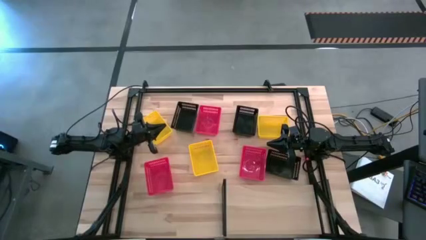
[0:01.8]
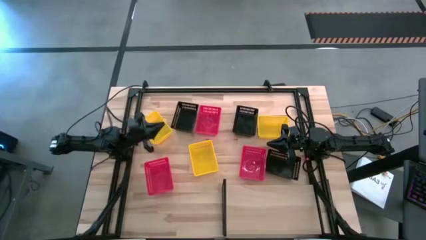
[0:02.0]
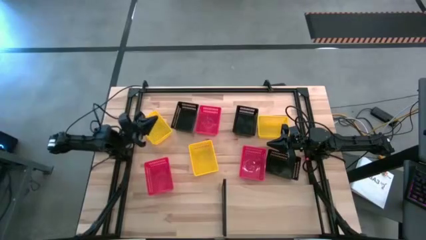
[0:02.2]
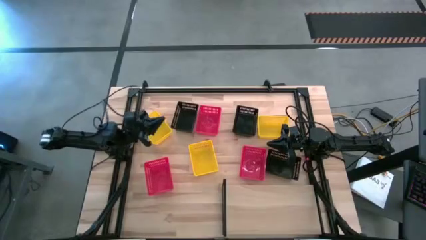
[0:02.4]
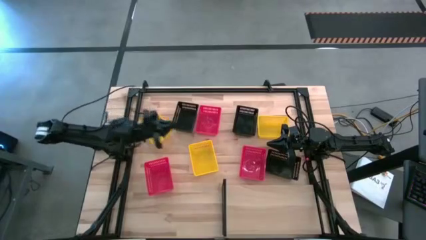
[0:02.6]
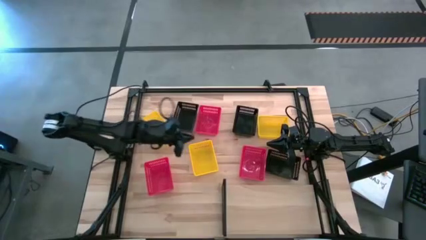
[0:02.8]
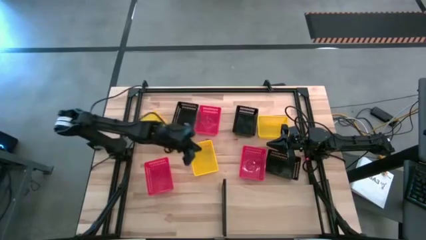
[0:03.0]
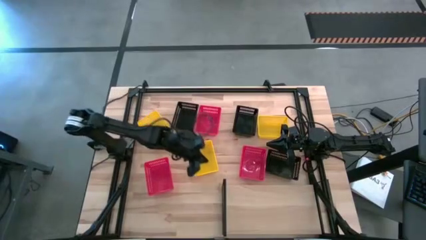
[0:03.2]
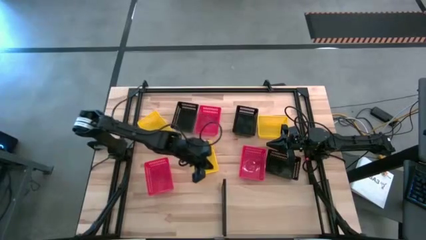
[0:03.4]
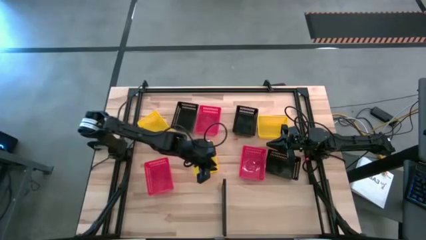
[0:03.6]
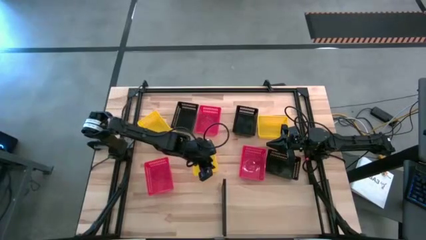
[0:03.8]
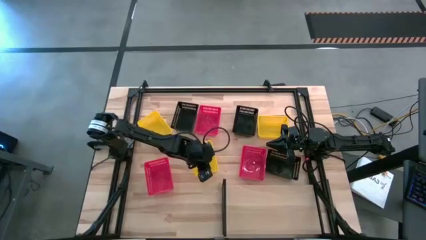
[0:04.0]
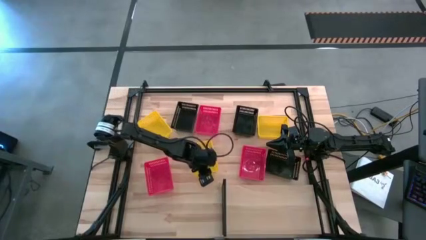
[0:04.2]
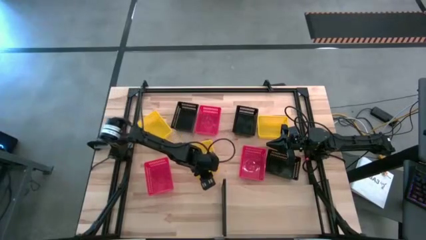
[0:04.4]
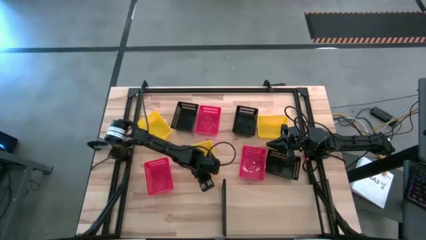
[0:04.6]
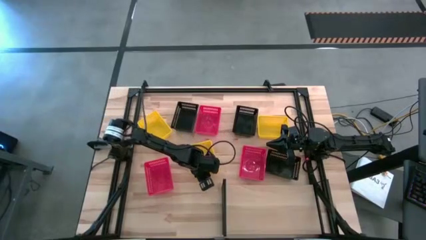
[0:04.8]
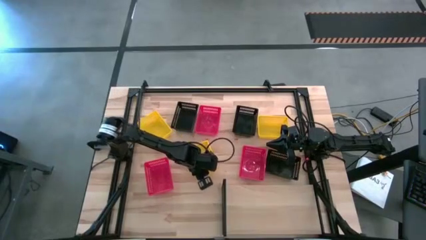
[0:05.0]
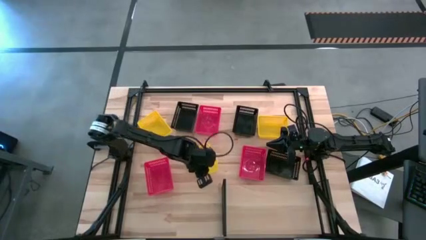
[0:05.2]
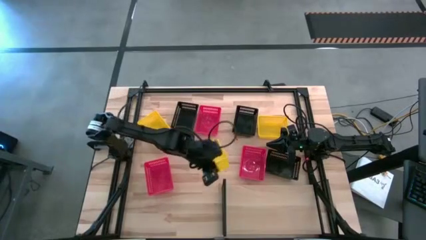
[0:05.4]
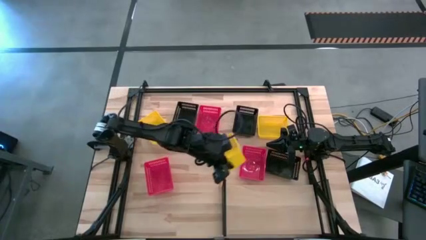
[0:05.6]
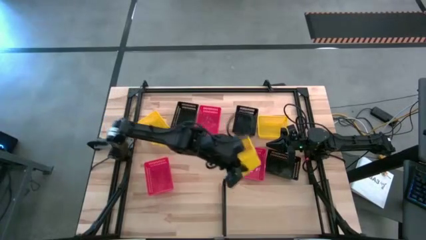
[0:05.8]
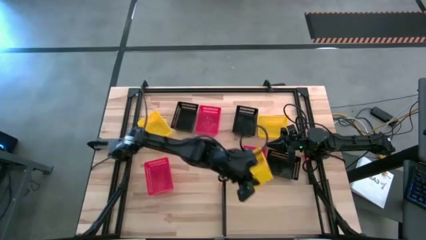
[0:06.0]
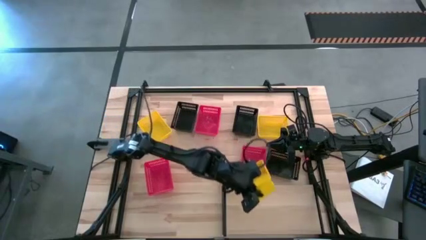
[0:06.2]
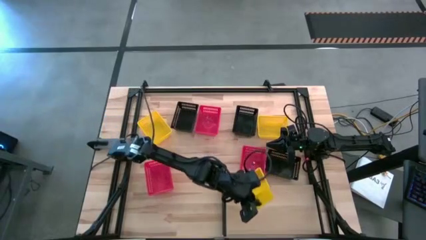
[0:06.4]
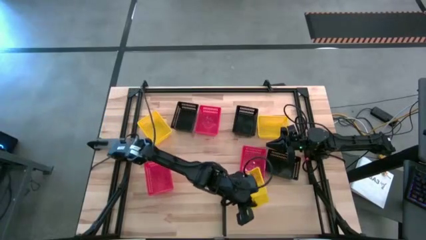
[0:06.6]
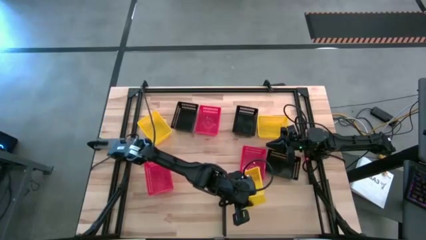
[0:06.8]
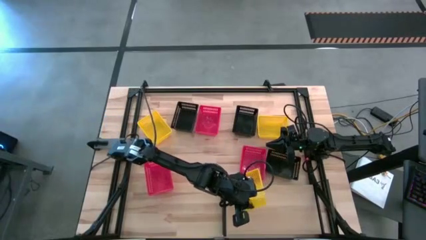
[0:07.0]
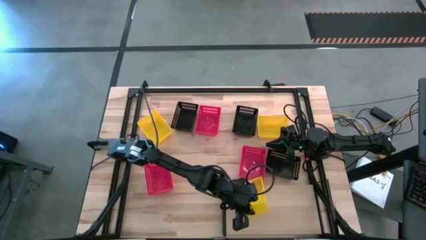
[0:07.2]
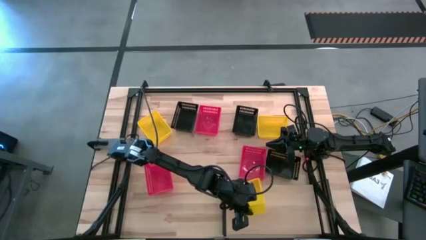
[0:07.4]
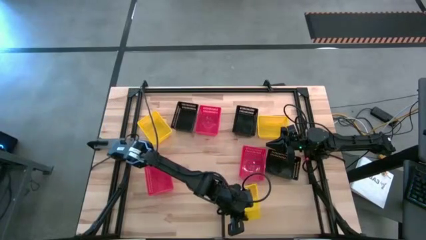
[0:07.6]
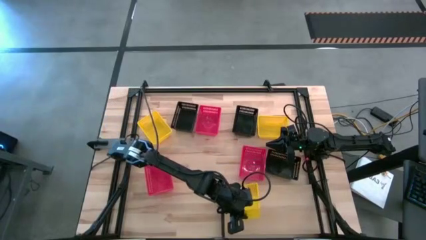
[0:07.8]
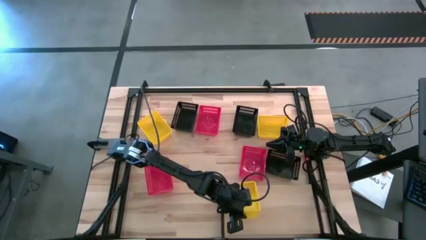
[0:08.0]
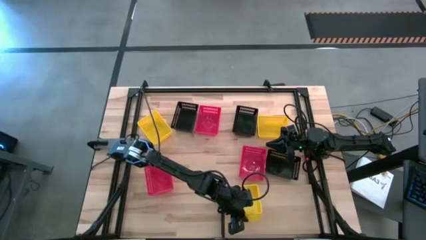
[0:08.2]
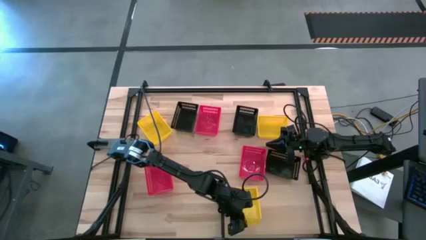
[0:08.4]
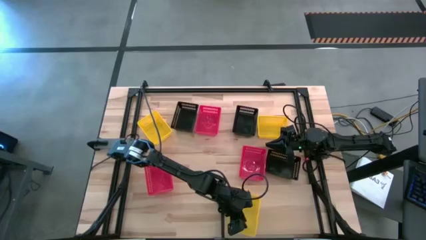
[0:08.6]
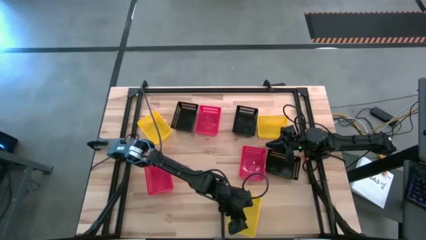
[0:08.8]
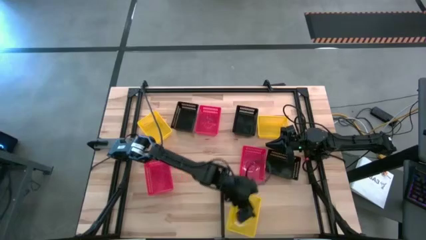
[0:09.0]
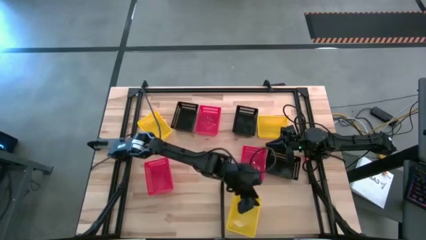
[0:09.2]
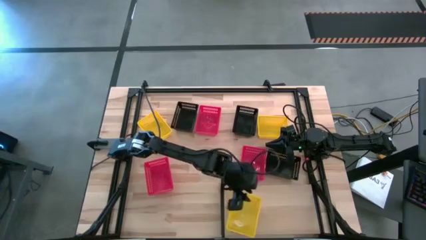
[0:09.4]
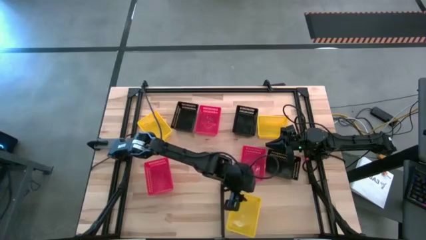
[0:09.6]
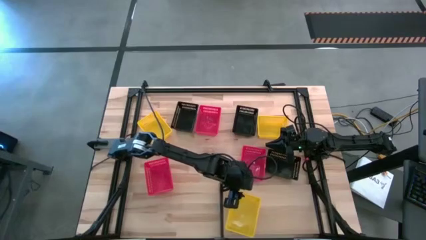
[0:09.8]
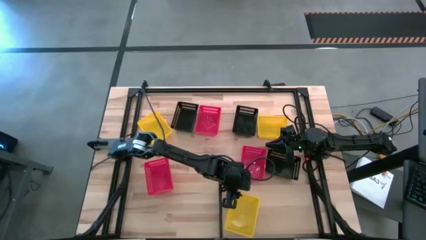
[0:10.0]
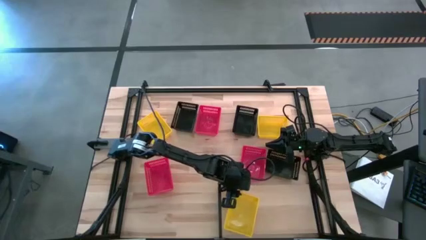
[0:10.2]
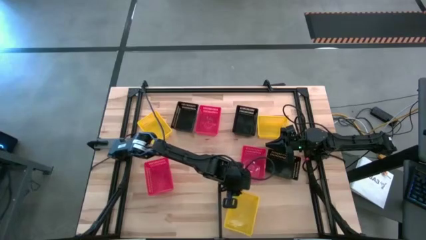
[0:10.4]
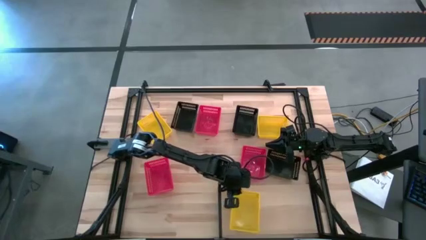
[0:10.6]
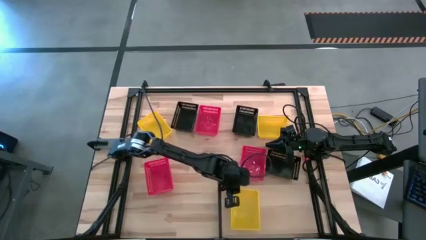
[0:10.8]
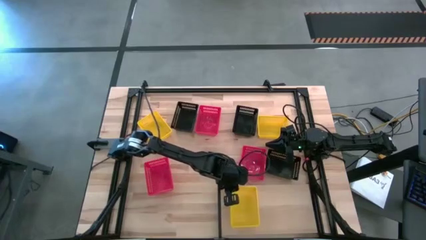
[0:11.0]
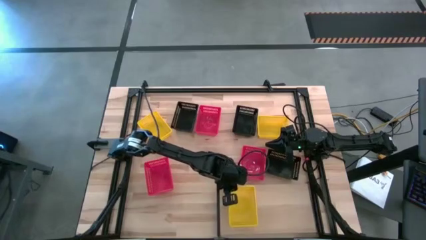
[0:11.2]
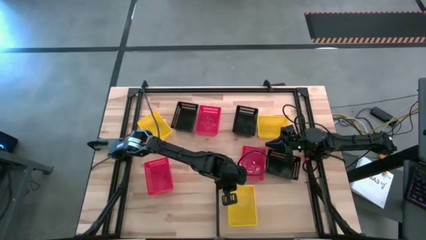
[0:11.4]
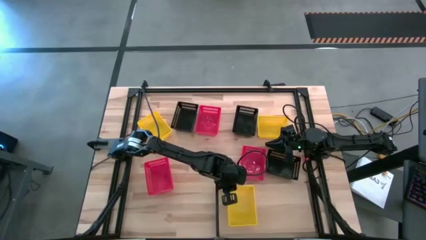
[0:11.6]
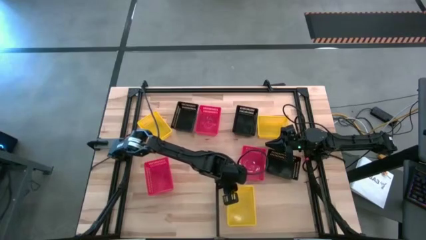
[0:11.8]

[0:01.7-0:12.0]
Task: Stack baskets on shelf by color
Put the bottom center yellow bin on the shelf

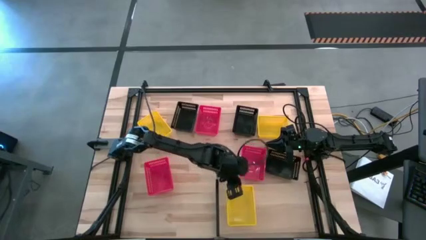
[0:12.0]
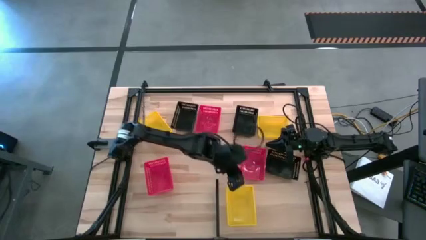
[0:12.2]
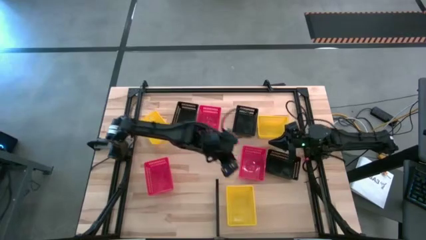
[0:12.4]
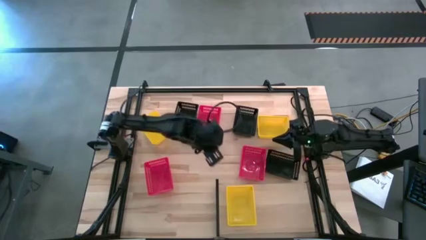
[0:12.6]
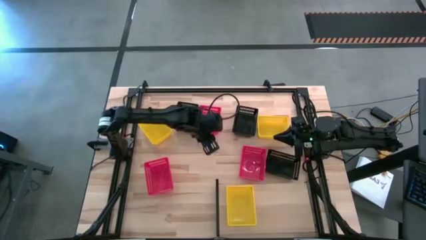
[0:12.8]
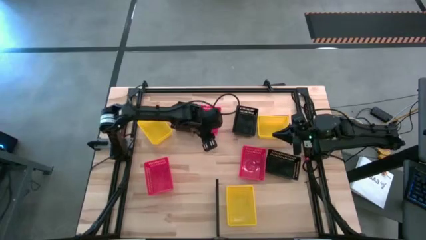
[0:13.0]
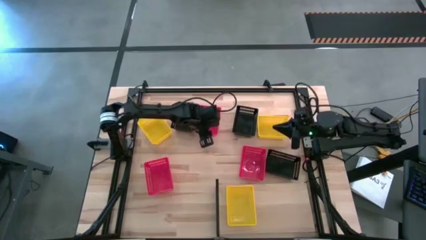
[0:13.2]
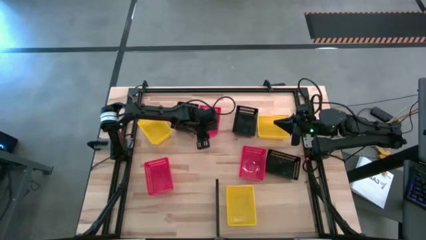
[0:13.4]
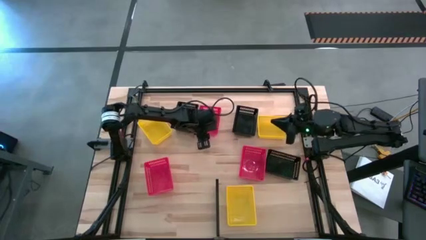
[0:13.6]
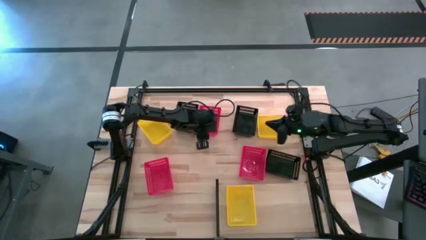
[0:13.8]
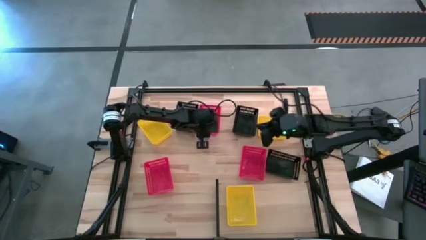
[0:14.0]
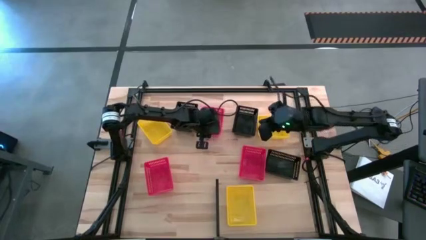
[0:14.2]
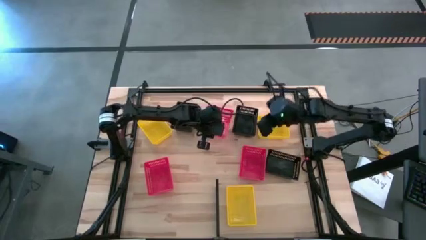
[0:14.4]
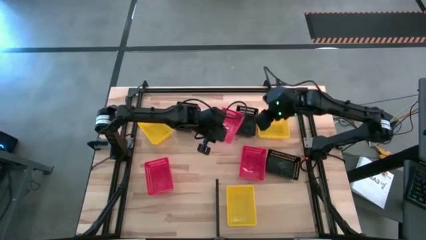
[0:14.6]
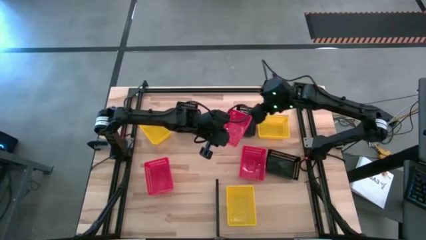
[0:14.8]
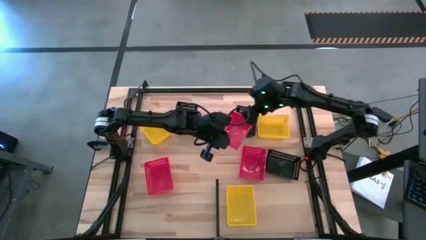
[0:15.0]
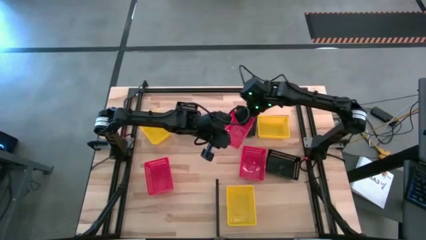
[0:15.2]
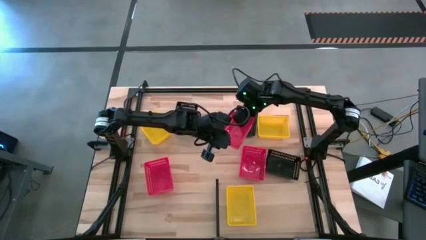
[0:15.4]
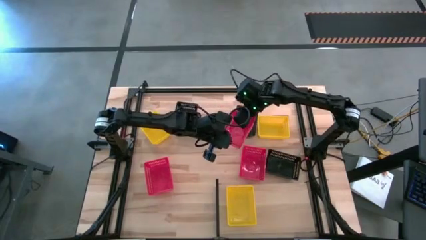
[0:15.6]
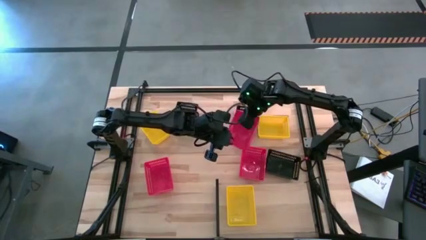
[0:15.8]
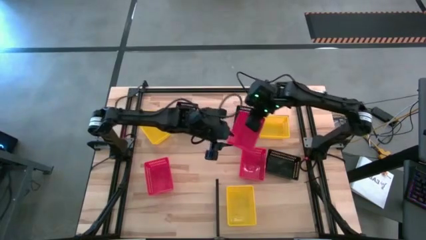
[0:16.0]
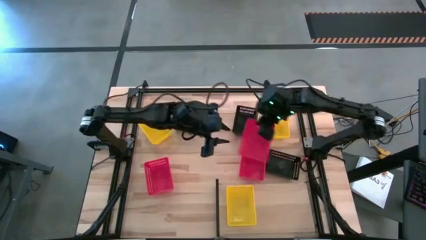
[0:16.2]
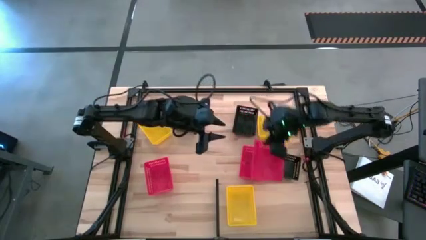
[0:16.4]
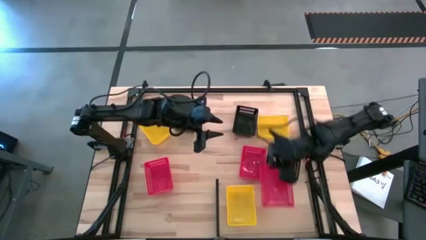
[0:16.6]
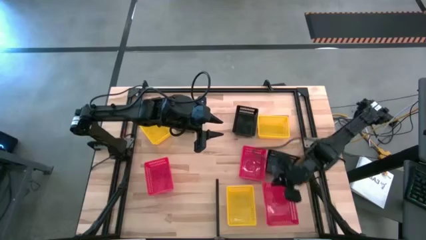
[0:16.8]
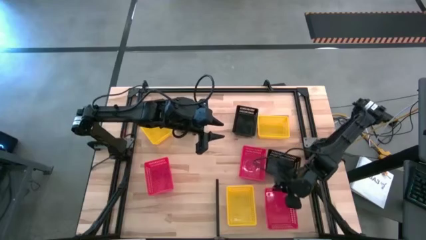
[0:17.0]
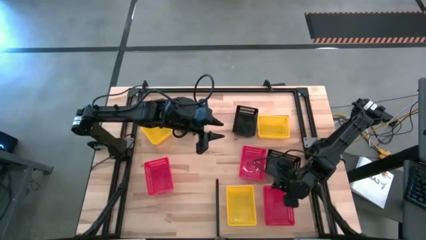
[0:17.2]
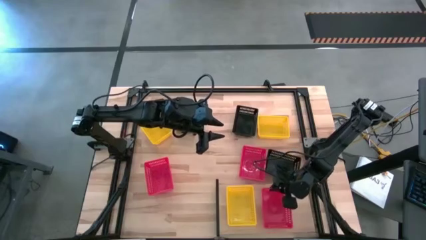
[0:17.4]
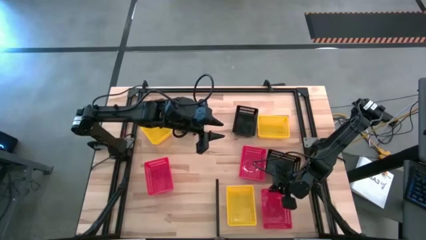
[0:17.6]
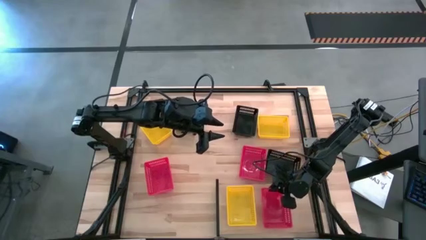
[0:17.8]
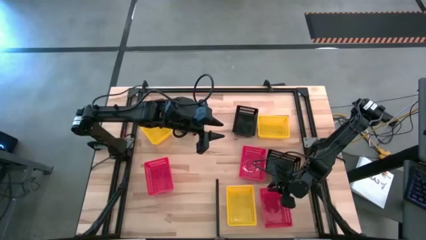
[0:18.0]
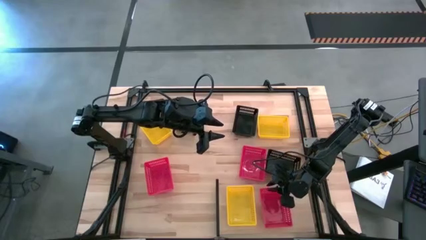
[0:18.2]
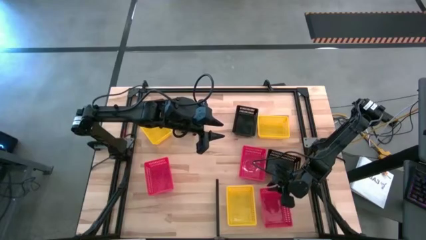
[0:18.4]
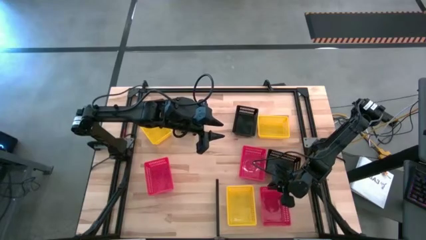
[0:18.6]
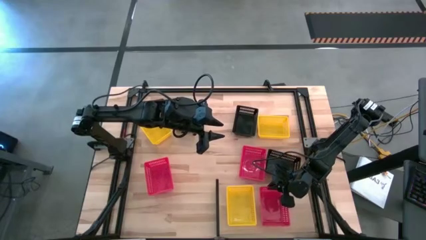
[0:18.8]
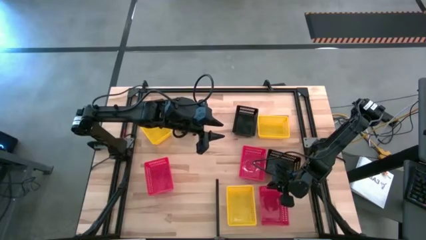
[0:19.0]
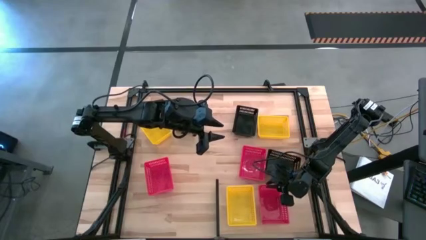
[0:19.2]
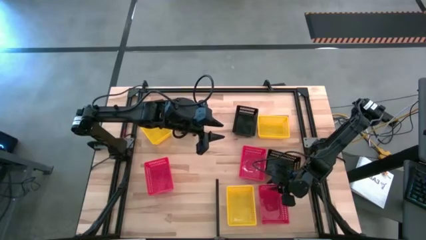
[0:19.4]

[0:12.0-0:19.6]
Put the top center red bin on the shelf
